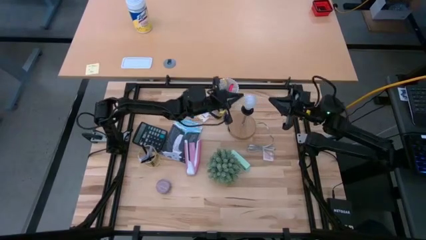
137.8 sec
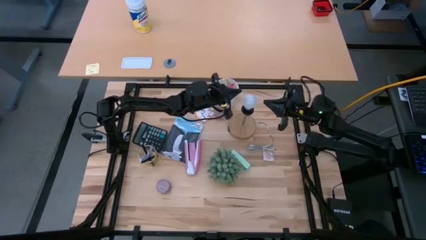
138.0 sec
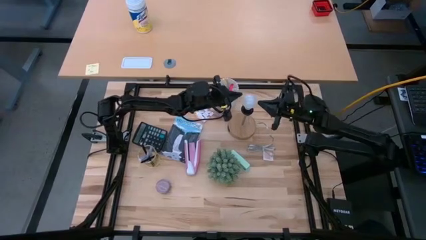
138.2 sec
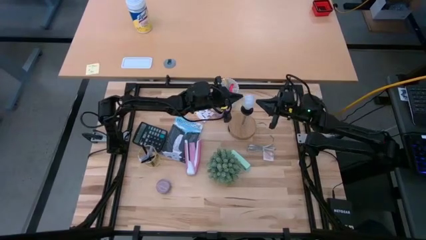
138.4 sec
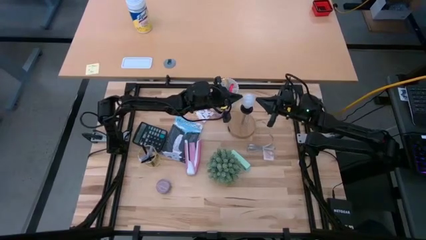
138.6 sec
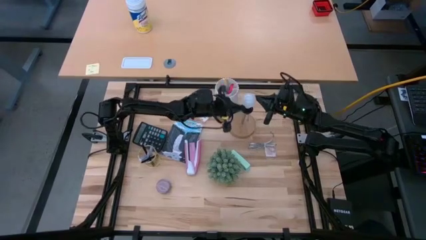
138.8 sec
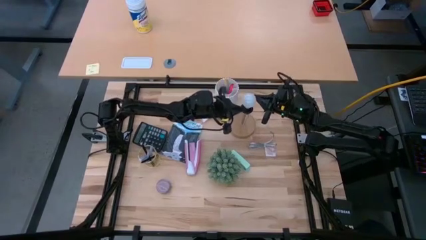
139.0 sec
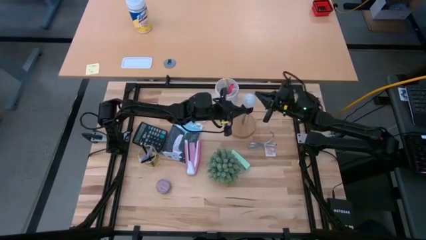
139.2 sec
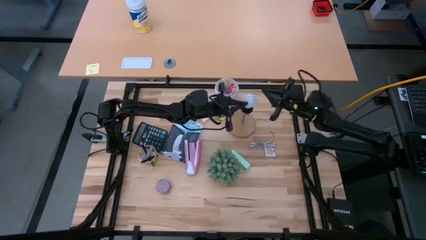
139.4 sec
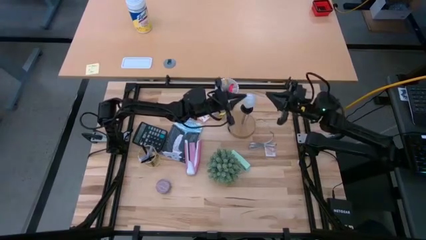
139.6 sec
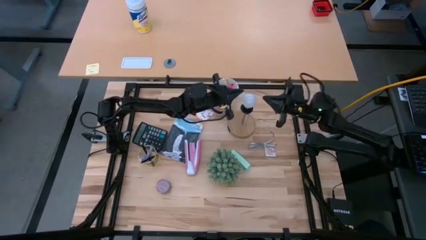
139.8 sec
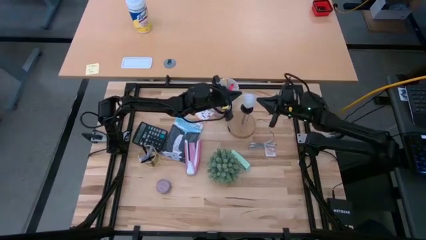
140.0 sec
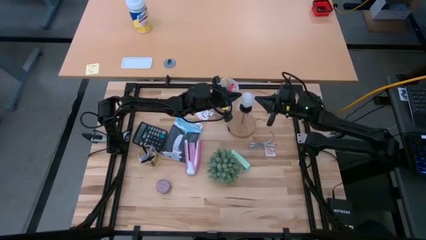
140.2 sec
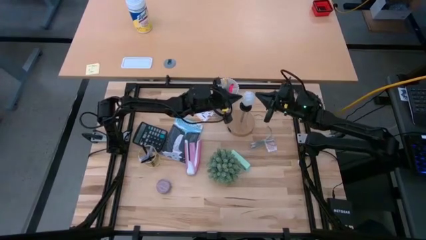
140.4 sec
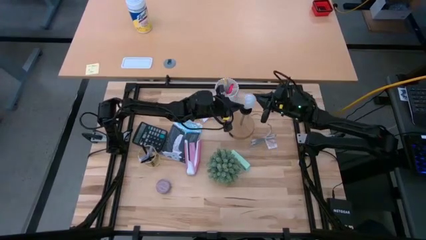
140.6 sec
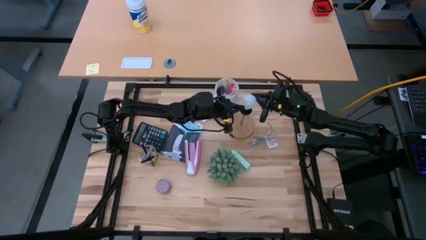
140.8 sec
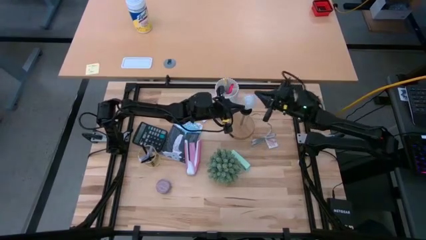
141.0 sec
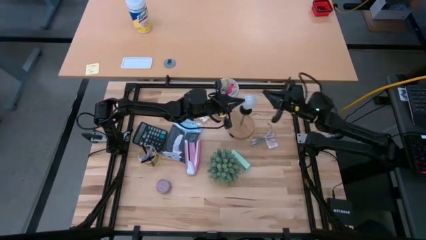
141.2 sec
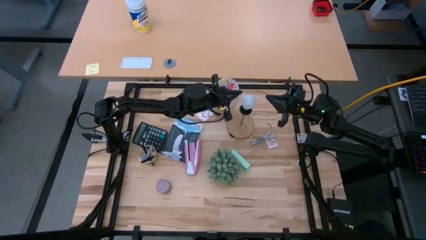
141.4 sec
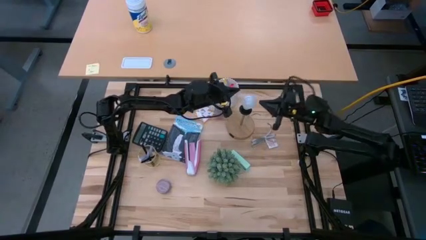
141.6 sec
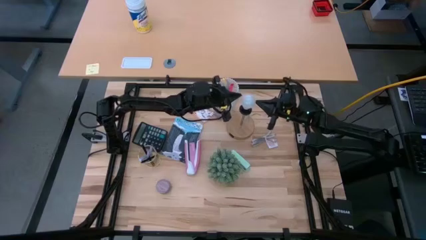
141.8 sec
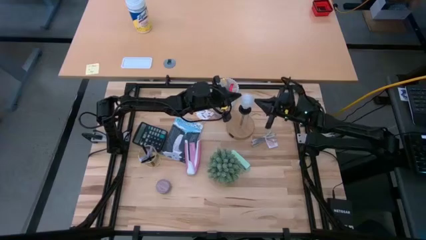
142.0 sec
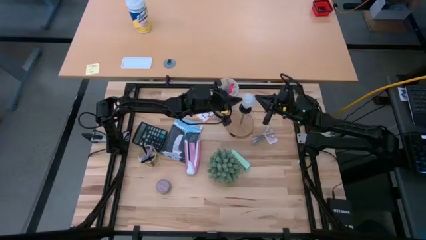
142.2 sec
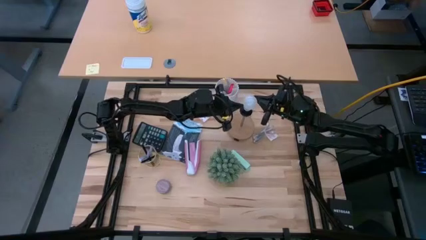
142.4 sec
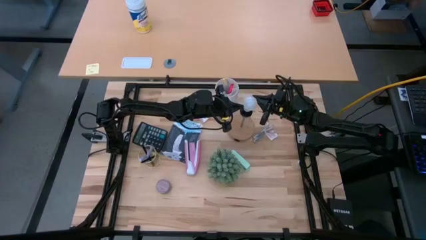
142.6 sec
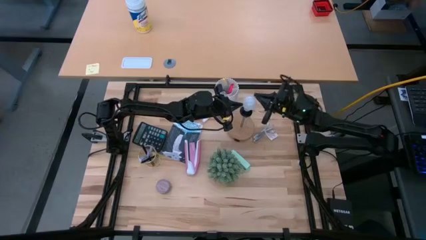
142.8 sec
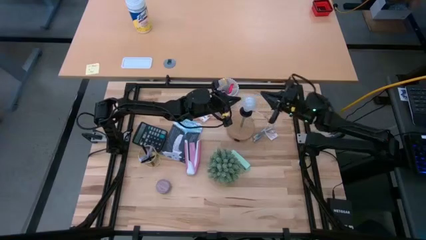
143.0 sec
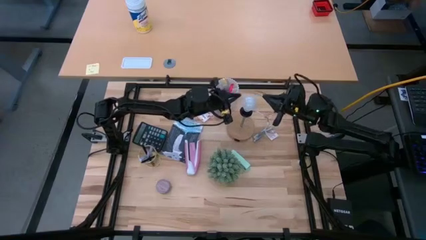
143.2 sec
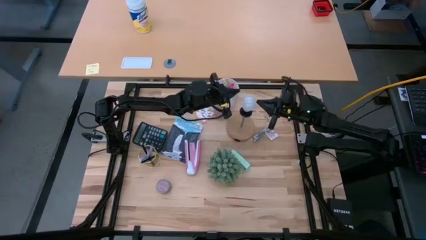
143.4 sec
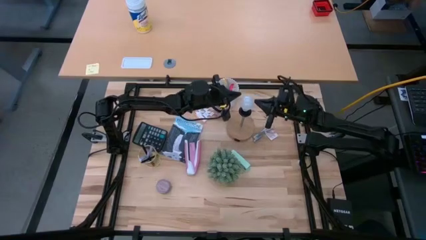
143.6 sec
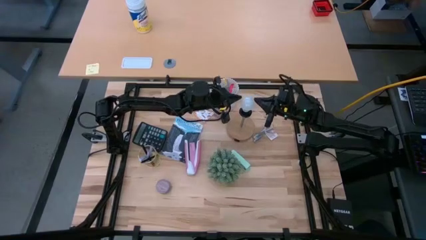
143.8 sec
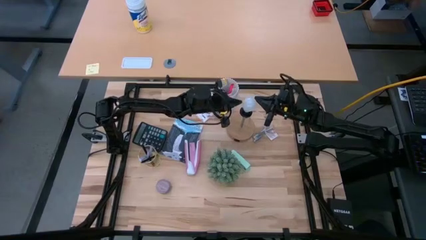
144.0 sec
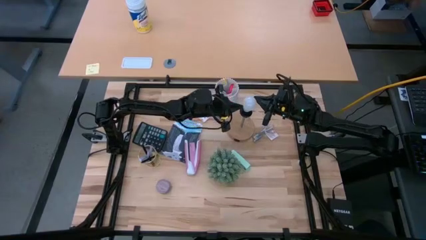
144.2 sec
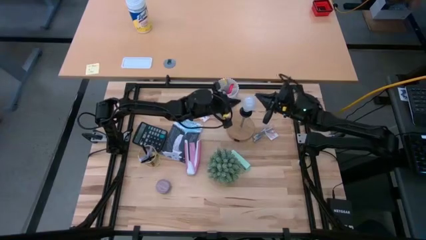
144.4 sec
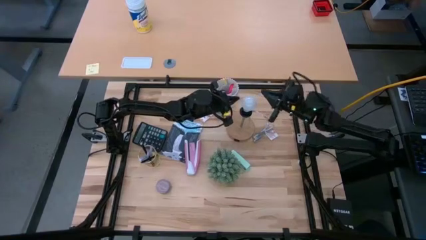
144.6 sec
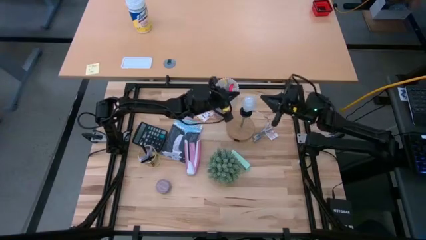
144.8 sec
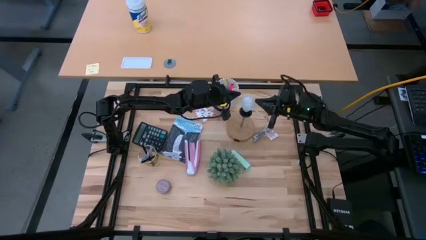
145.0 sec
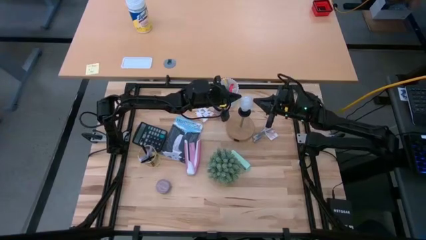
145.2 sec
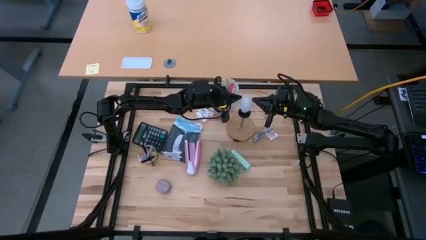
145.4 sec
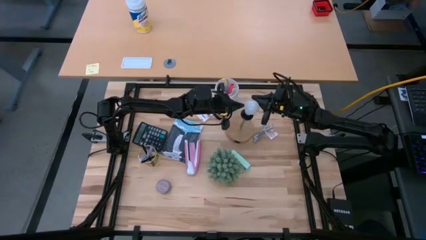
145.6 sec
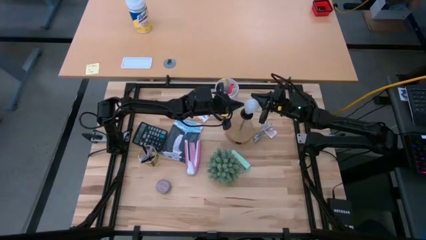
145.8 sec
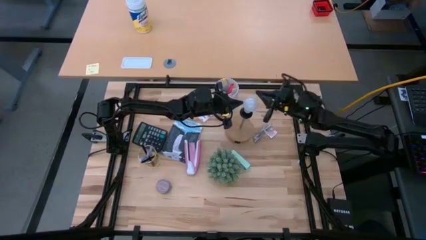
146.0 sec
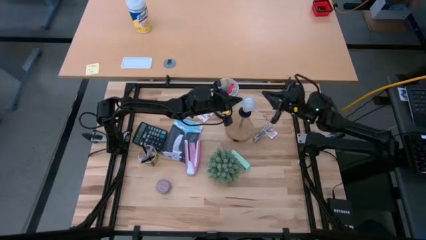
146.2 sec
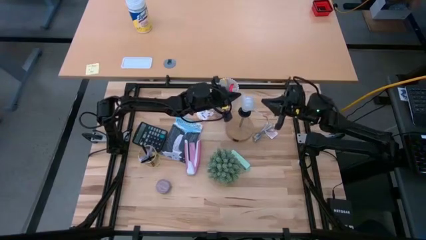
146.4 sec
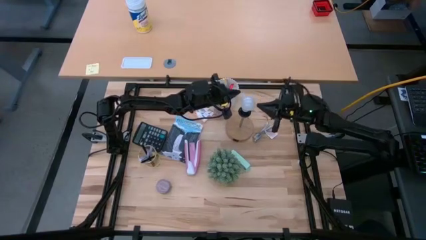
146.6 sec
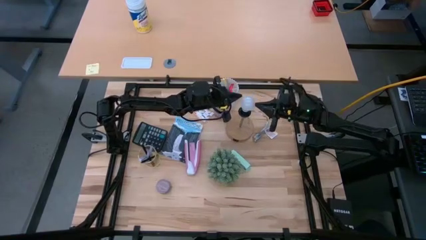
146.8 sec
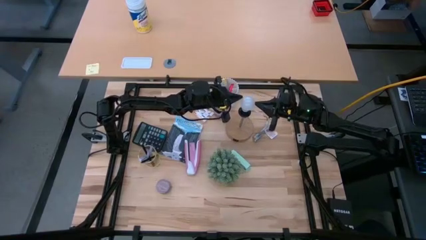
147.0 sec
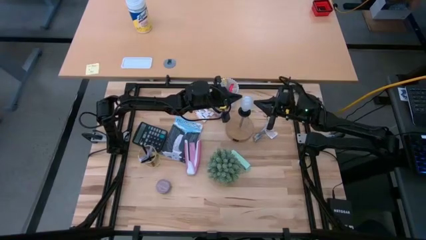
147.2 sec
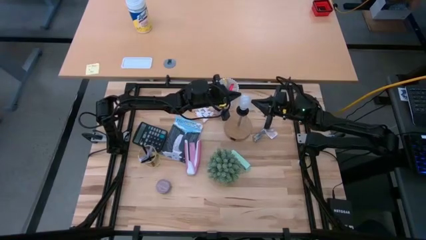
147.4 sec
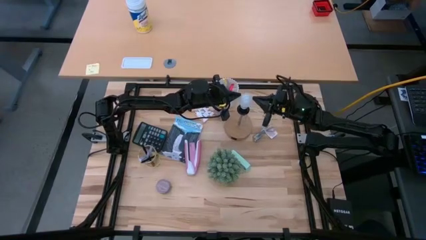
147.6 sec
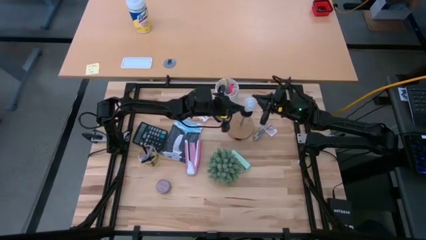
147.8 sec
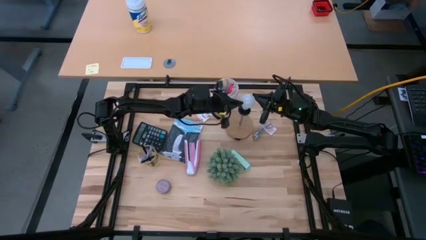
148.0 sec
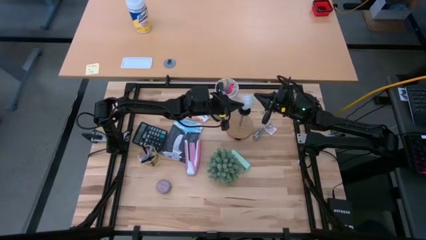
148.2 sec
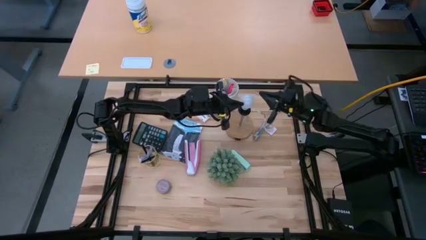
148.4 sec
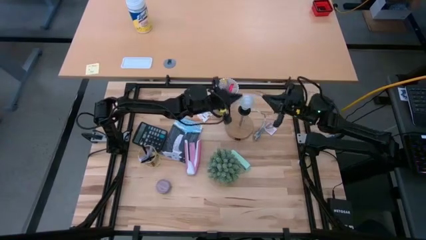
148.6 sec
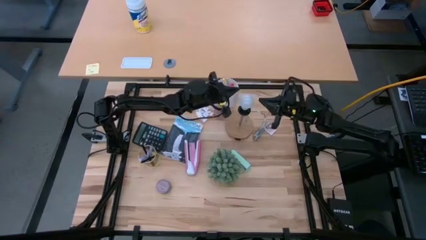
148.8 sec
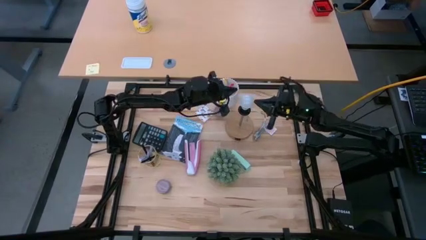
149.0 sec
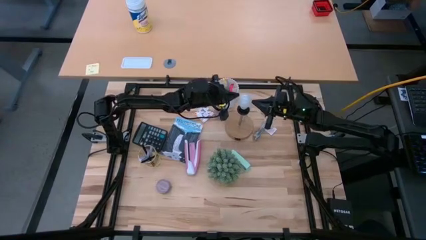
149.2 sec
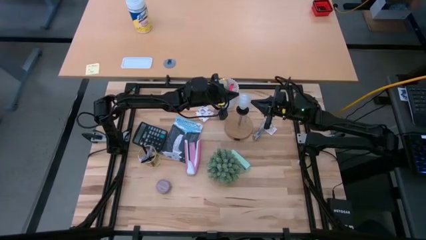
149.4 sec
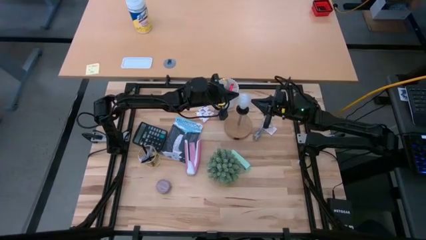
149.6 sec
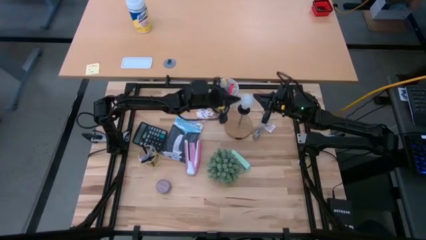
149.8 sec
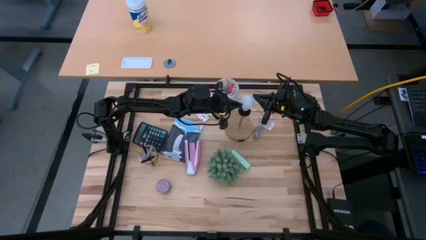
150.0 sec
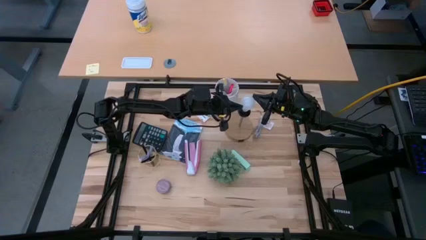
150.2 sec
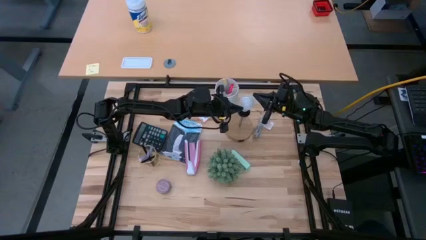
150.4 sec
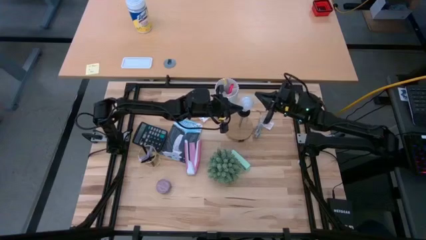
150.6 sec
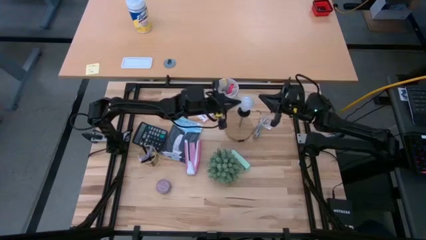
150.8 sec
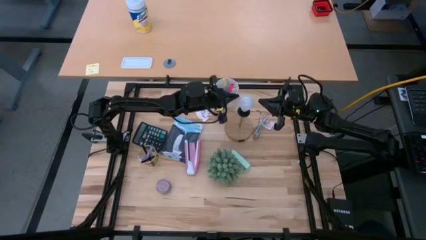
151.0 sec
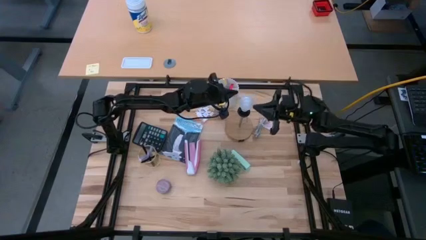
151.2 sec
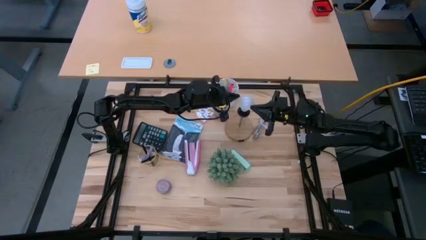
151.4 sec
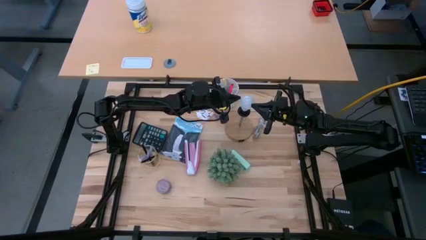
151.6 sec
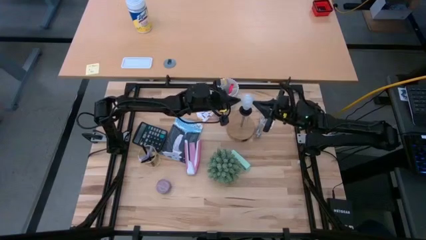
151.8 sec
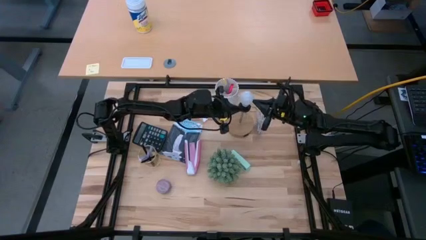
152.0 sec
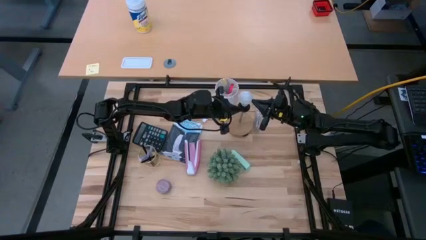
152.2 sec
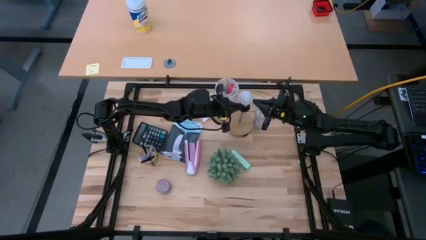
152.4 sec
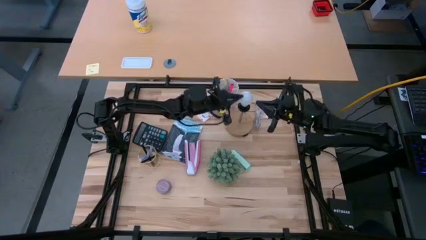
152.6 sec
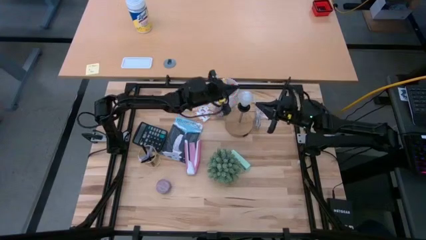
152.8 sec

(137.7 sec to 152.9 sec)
Task: Screw lightbulb
Remove the lightbulb from the lamp
